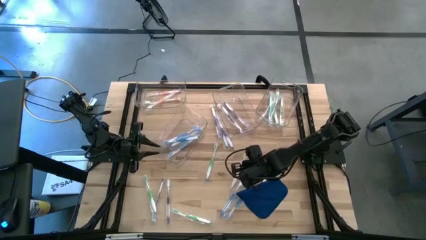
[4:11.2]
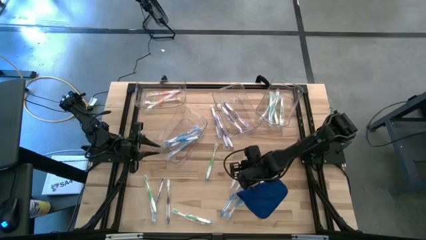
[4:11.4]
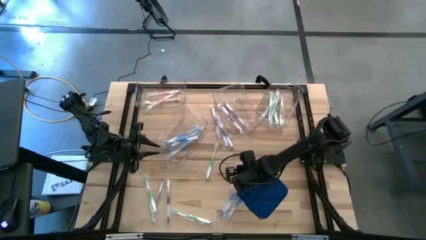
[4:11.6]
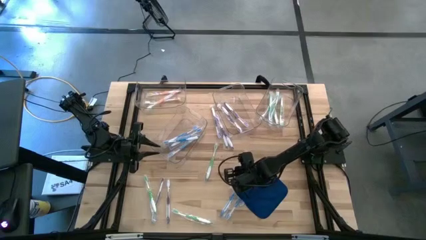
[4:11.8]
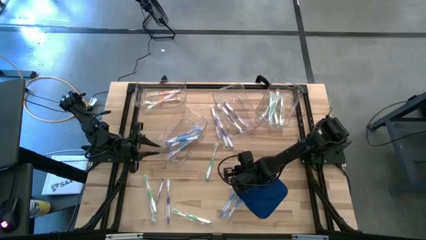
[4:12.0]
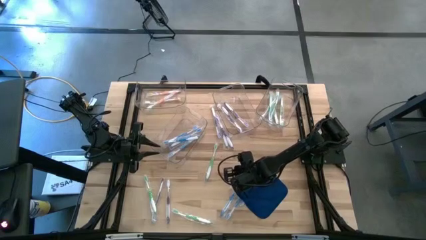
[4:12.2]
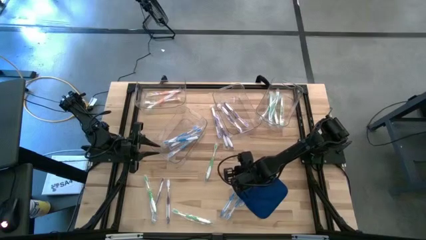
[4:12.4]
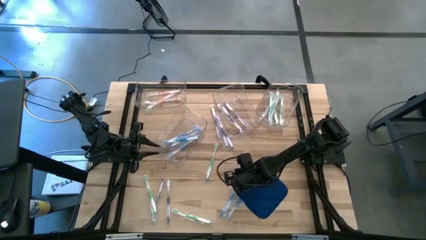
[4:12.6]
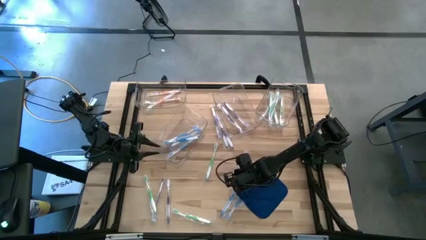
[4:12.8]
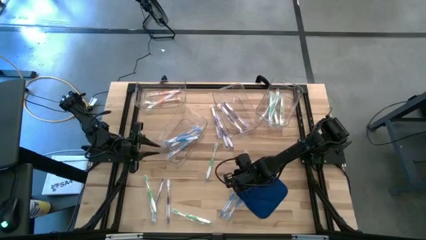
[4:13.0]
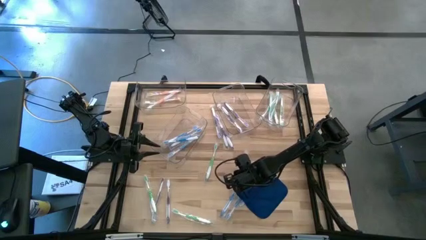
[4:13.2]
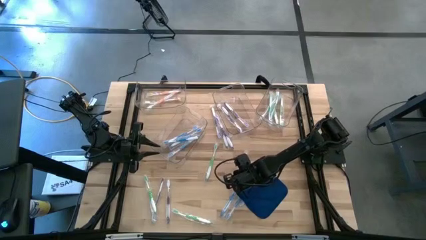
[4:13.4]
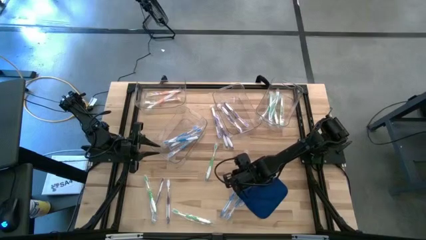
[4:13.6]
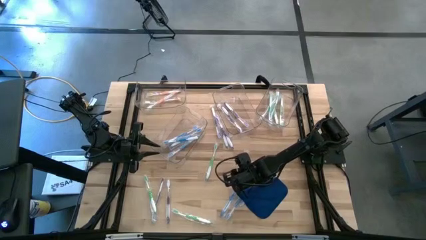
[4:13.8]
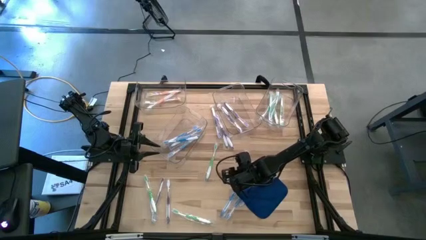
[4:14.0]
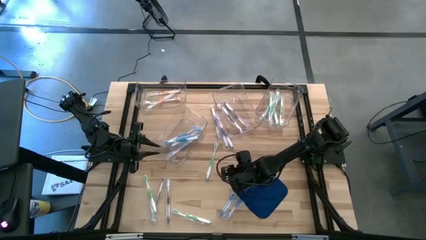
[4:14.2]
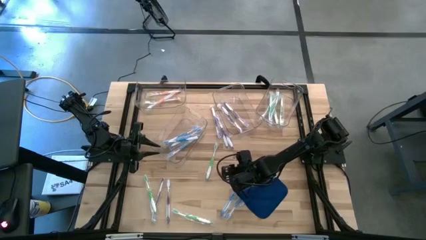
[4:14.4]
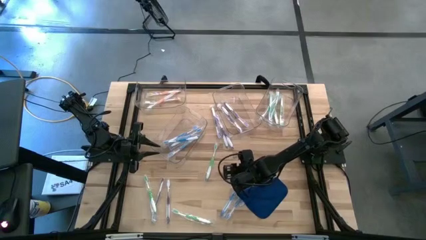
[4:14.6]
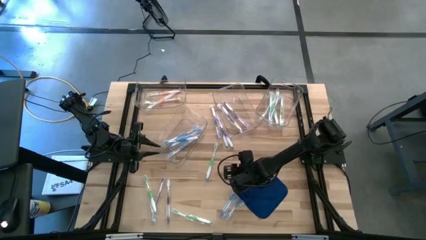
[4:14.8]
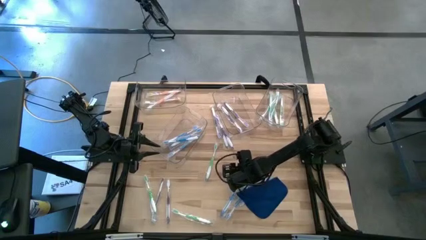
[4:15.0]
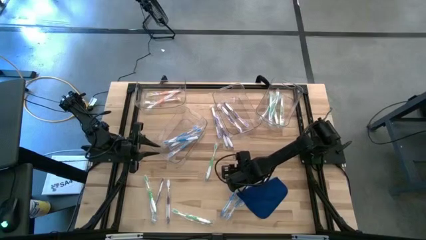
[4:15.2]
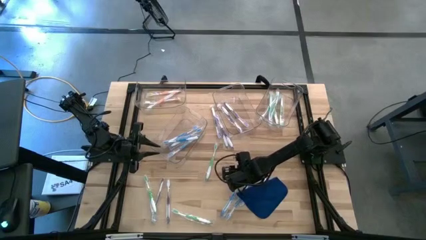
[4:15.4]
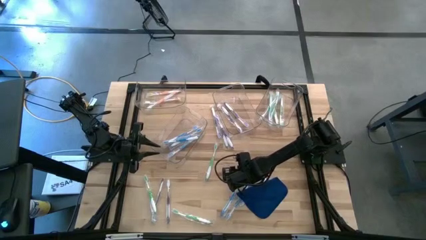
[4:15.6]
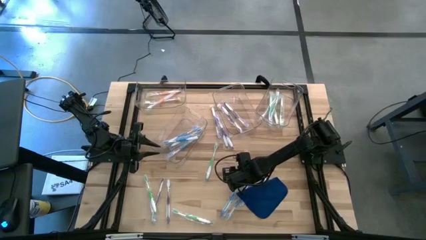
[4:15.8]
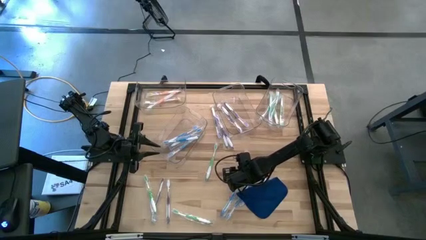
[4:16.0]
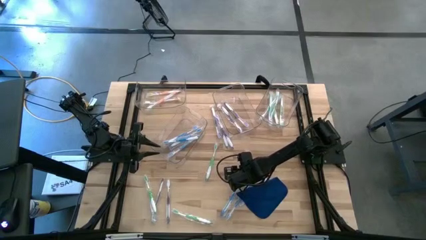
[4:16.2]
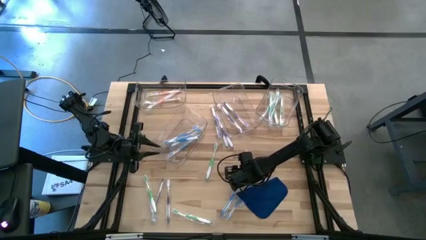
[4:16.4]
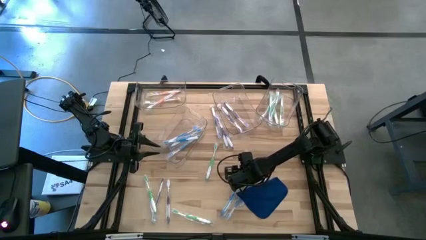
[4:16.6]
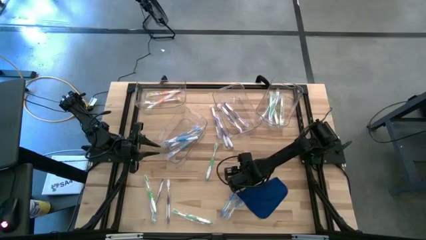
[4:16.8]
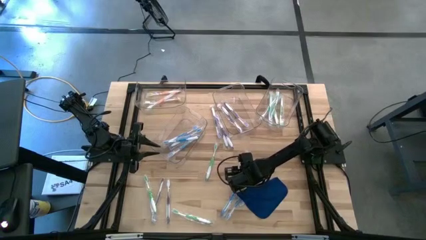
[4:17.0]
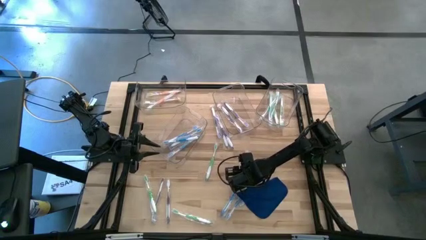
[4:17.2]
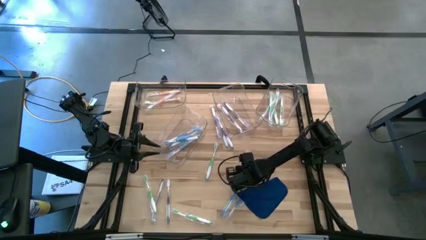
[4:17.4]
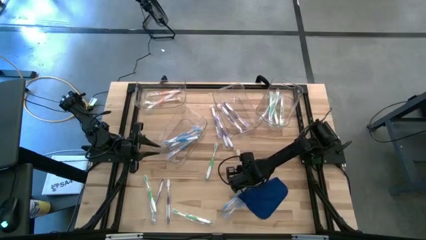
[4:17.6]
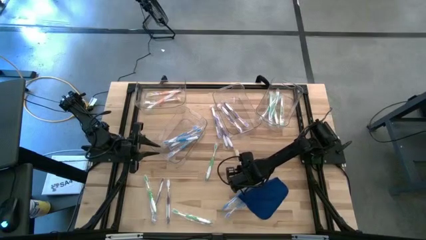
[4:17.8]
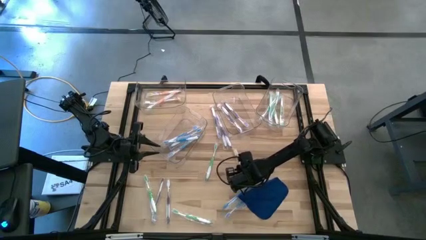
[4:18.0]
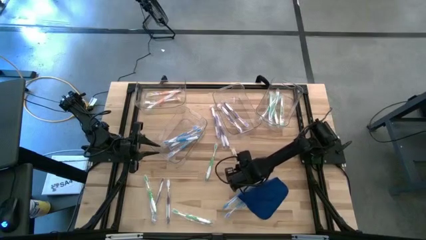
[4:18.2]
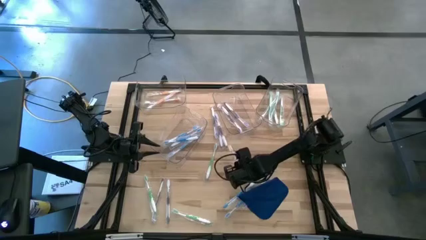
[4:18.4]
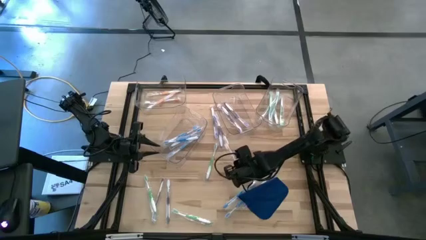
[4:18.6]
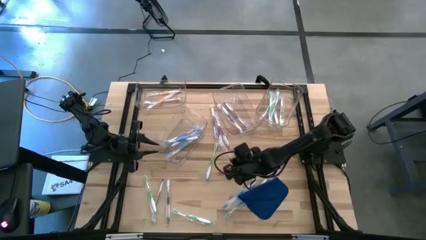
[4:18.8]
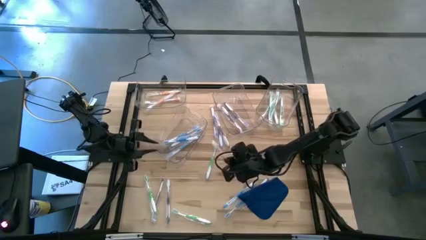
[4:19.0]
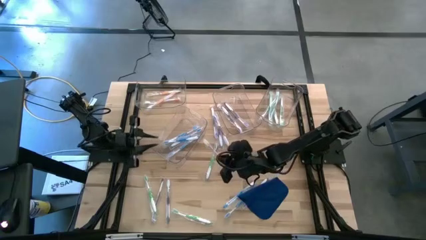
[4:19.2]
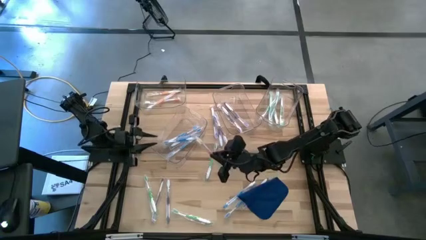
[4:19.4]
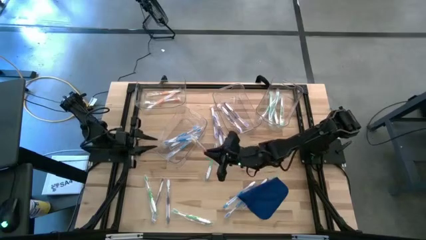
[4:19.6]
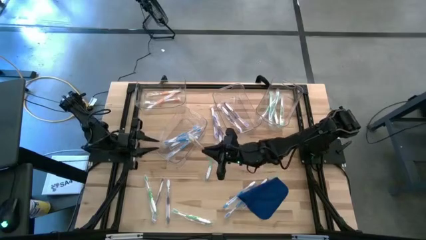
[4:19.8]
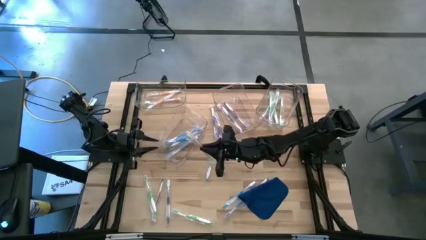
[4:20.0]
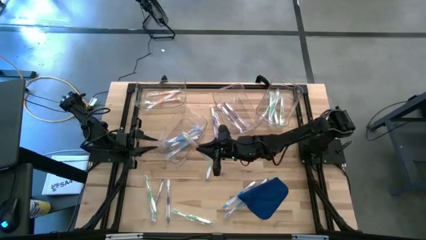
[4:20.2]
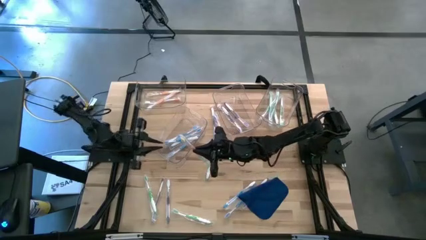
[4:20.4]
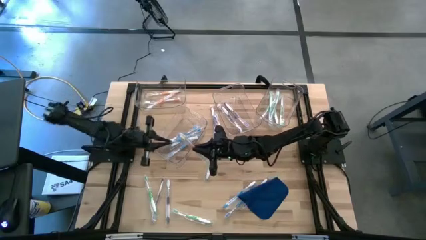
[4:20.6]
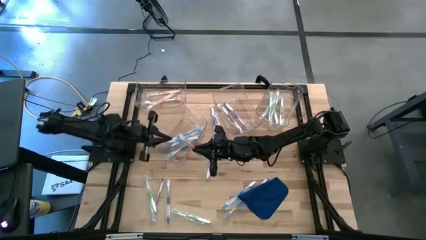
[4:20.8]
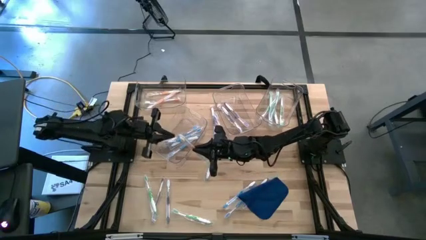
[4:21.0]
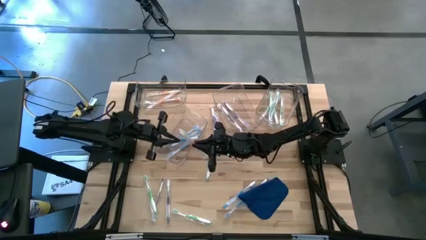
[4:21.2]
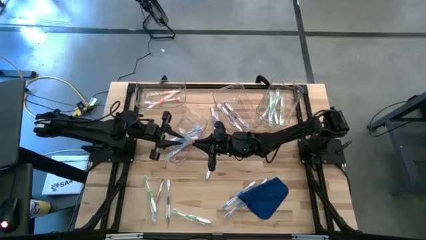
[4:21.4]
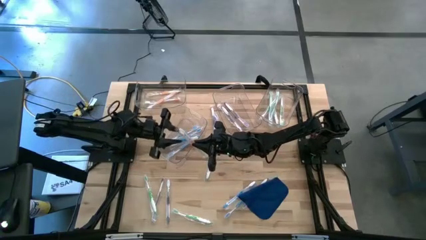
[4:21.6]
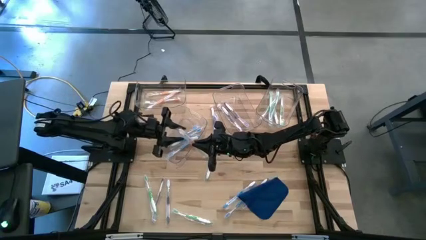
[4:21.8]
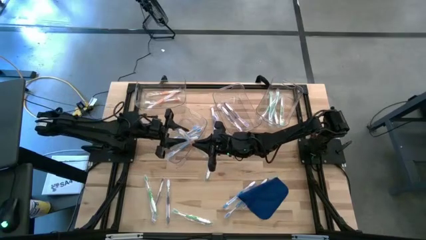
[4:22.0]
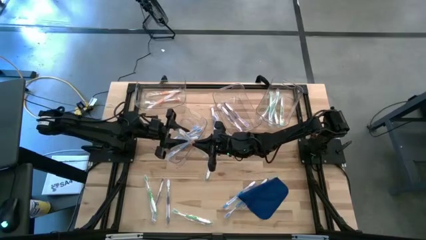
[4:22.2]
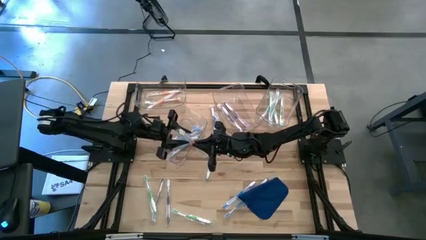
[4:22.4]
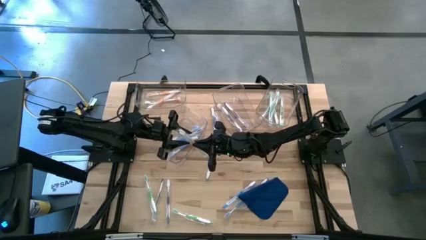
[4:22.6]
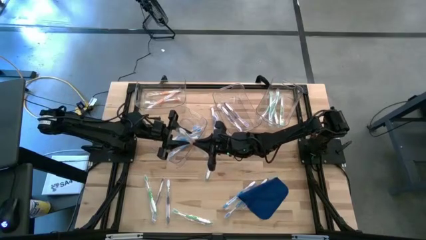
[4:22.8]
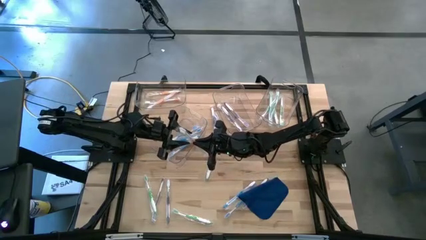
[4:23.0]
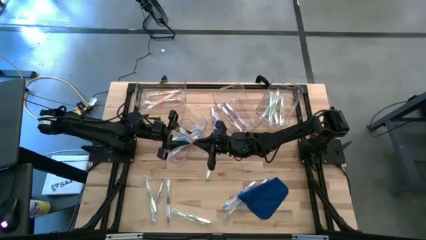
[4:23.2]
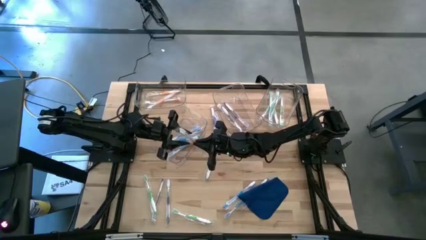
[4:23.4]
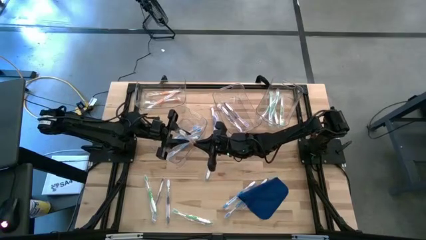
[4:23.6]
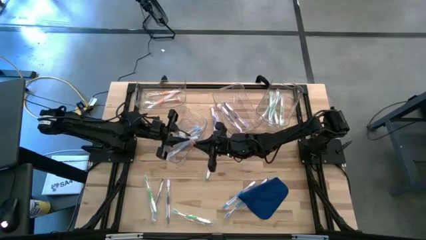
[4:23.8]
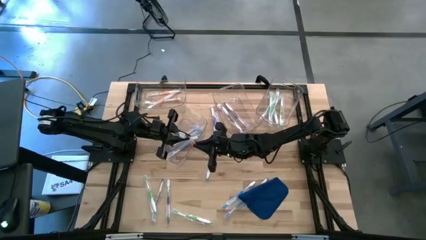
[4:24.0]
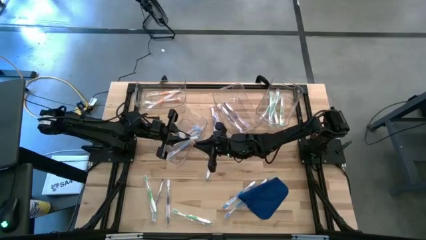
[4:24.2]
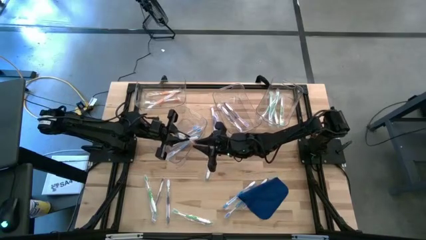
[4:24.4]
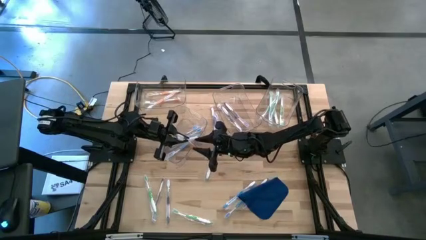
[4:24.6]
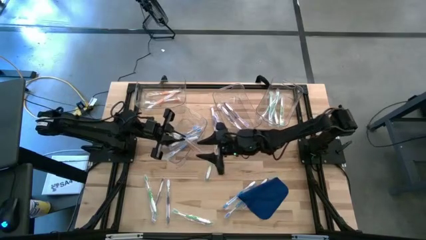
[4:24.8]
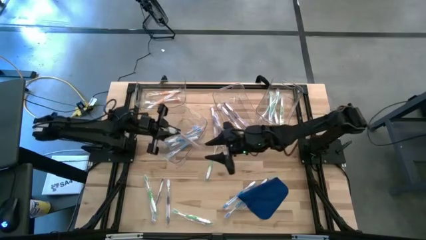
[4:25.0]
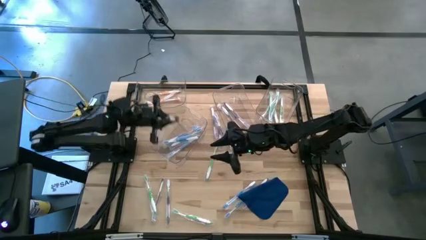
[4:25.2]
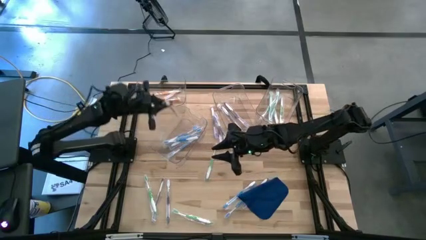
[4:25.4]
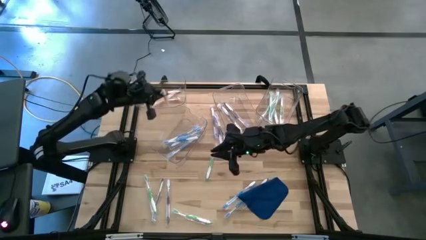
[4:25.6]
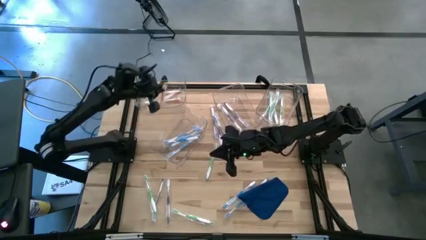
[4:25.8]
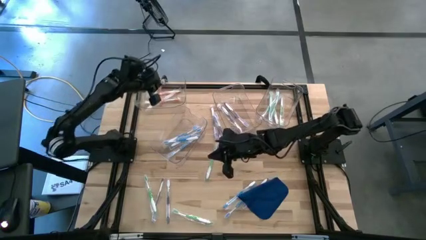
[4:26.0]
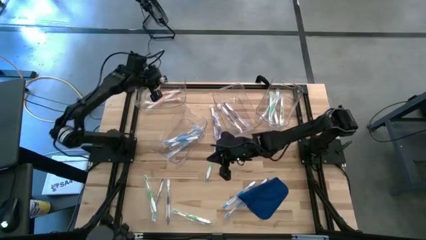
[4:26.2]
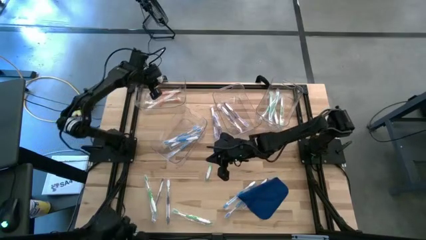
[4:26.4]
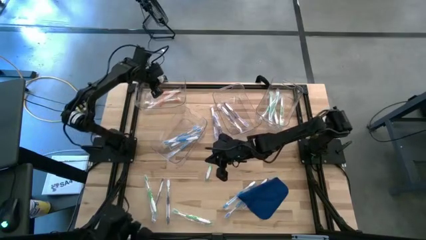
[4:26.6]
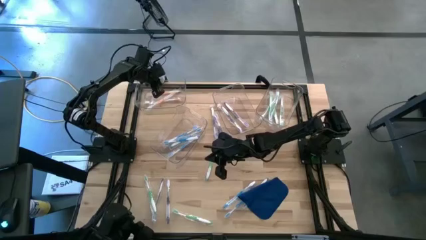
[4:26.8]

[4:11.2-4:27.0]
Task: Pick & Place Toothbrushes
Put the orange toothbrush into the top left transparent bin
